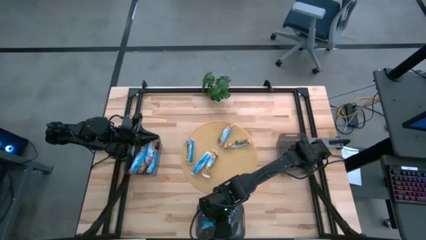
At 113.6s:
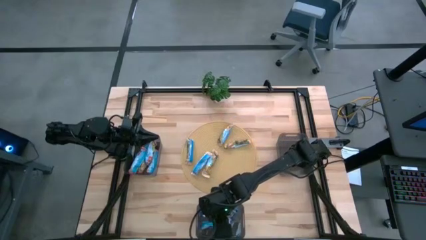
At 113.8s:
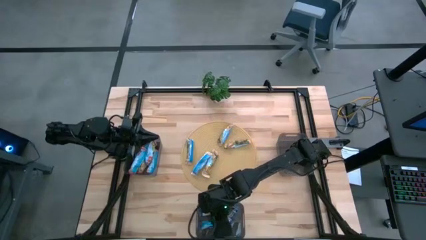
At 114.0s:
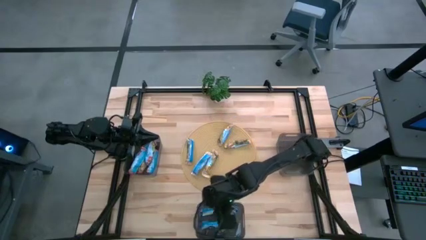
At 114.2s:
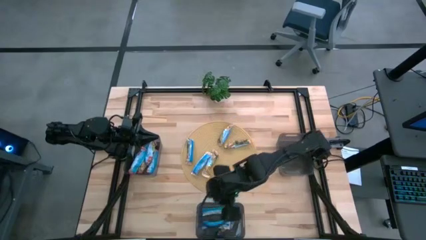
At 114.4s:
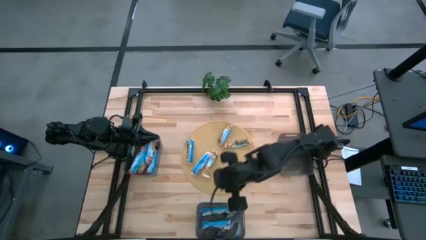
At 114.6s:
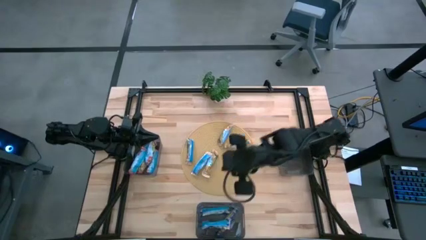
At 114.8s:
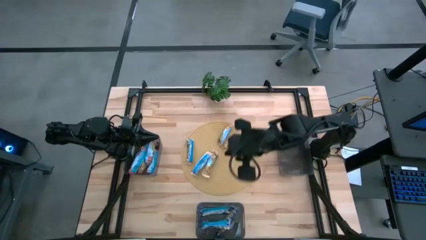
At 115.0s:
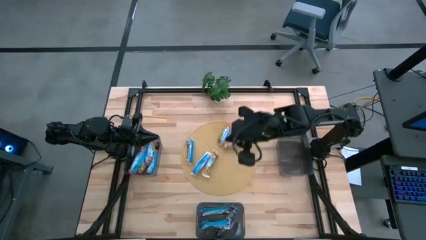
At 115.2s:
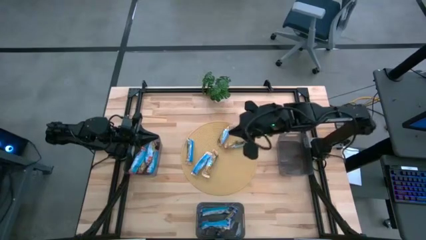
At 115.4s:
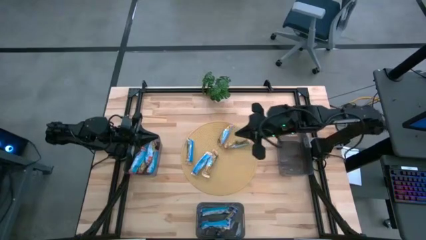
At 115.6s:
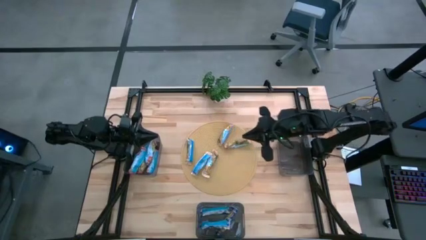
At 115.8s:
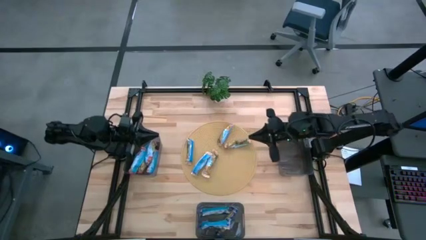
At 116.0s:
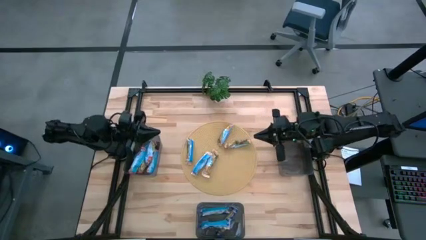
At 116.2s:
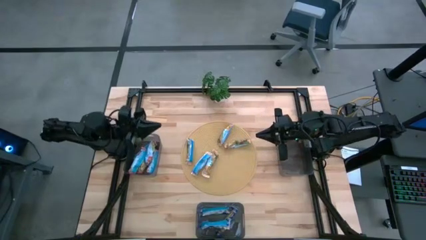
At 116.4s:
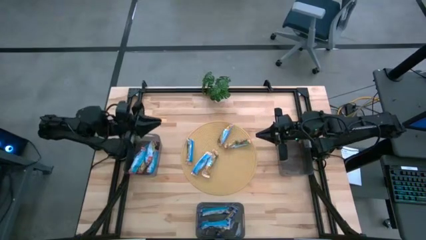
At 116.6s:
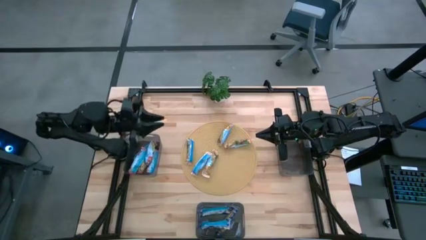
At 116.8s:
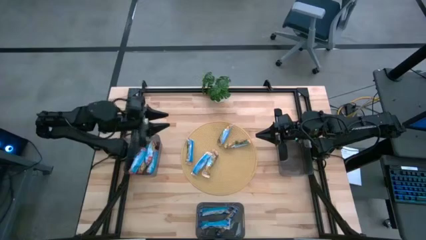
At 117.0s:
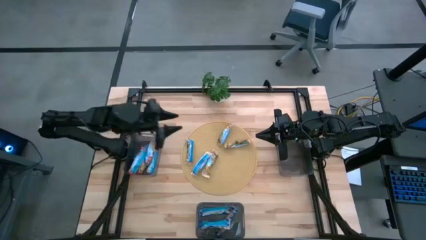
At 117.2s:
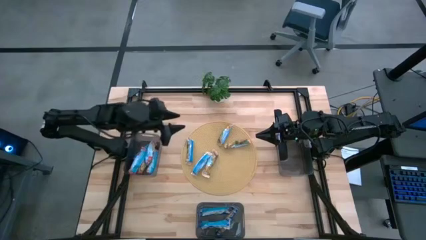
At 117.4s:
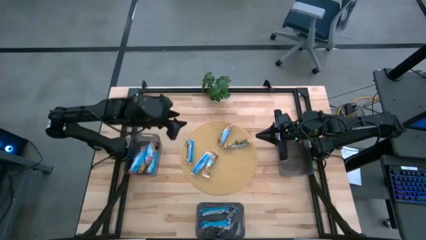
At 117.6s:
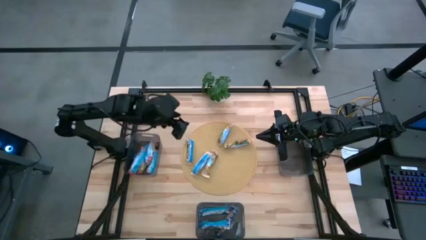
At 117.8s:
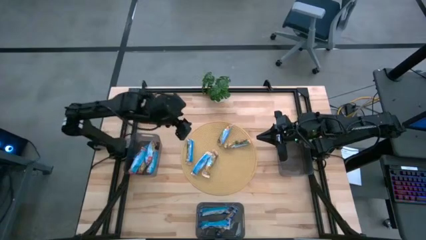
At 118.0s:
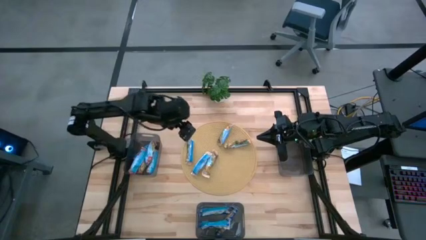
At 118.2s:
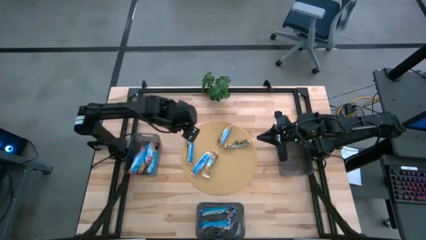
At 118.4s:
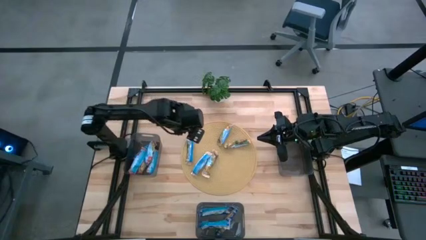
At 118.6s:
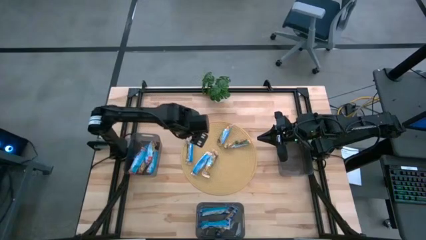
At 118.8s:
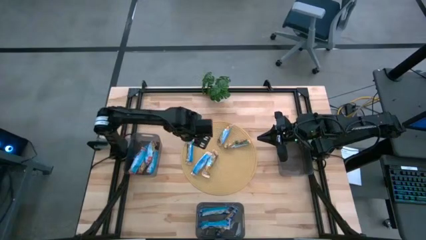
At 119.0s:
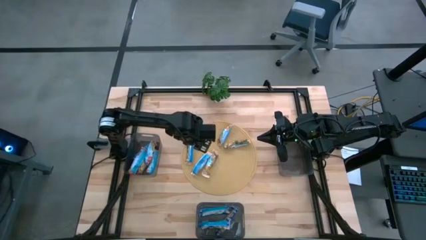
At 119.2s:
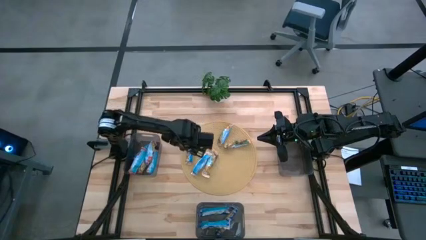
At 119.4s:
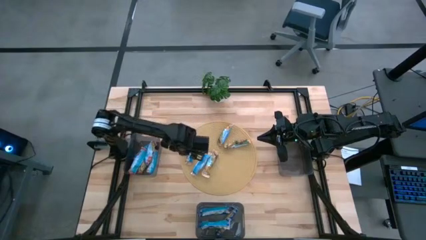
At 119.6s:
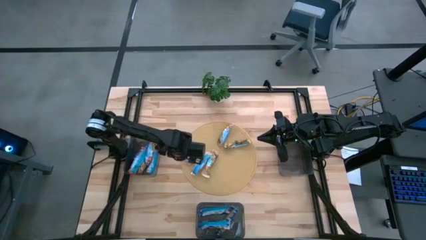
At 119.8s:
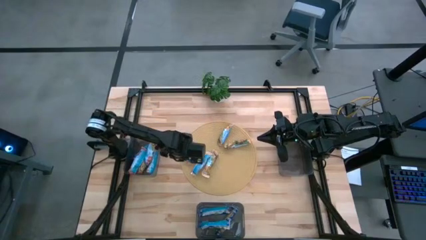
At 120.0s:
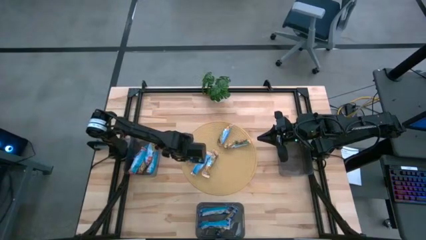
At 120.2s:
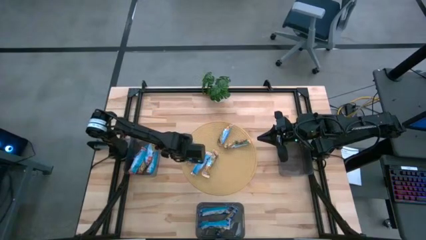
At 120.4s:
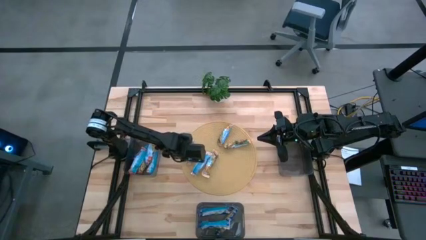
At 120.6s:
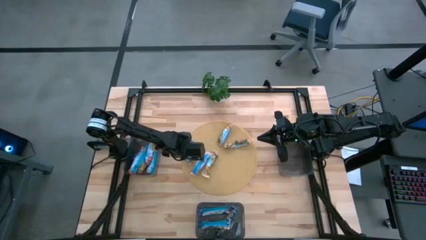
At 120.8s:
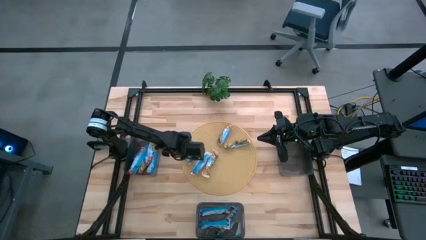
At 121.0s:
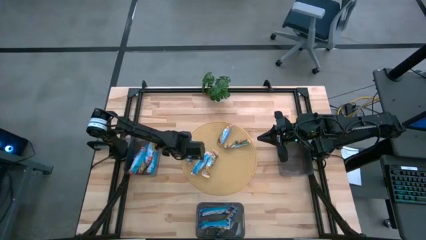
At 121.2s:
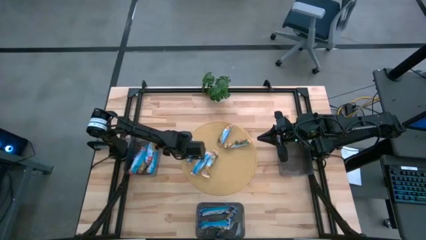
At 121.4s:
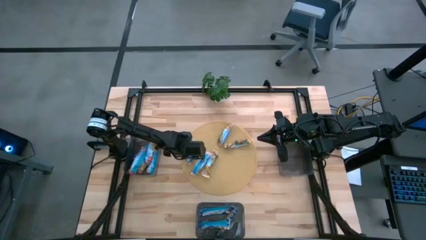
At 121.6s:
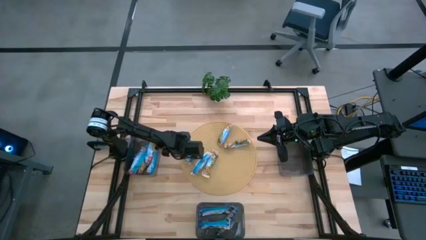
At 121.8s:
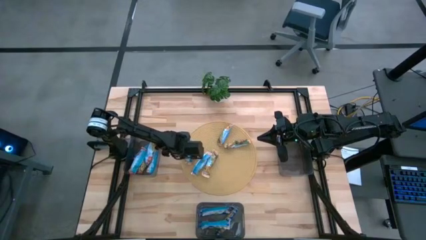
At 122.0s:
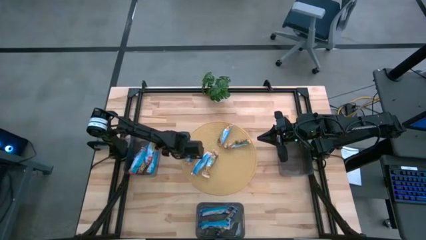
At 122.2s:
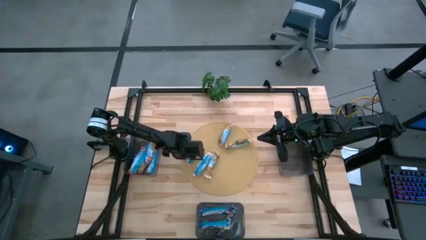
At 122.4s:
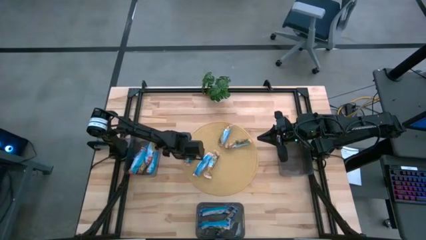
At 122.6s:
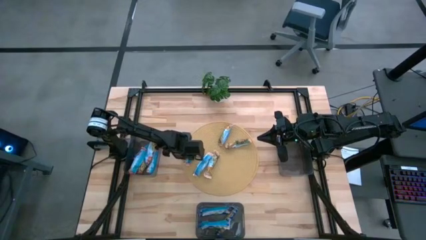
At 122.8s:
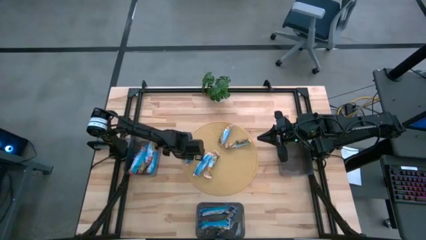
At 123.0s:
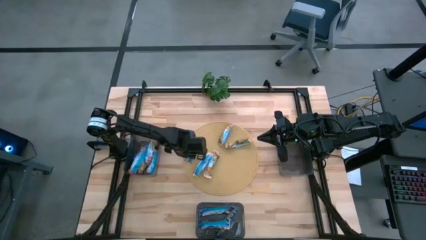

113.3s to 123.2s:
Task: Pick and place Granola Bars by type
Put the yellow granola bar into the top right bin

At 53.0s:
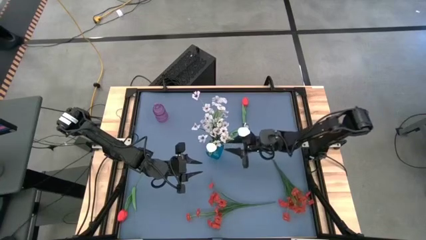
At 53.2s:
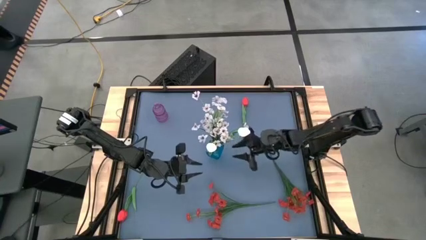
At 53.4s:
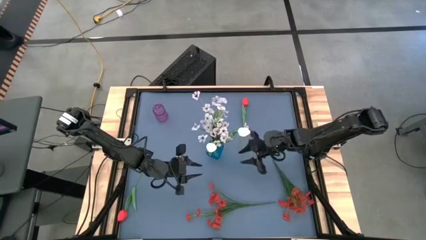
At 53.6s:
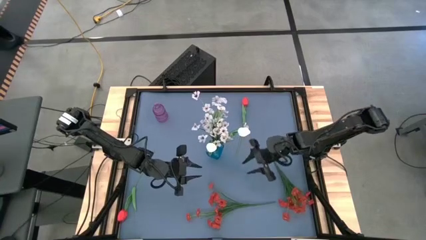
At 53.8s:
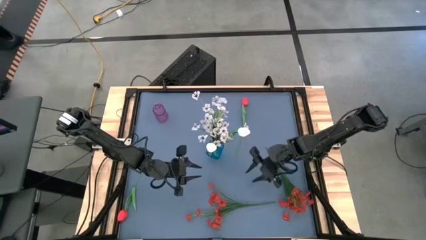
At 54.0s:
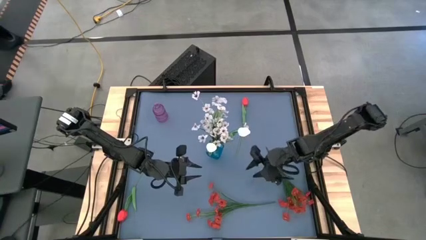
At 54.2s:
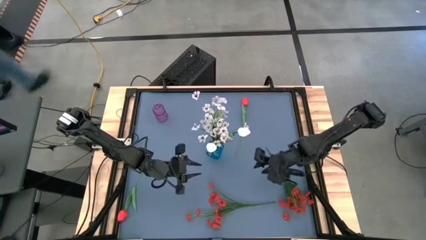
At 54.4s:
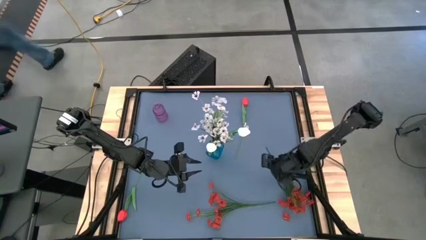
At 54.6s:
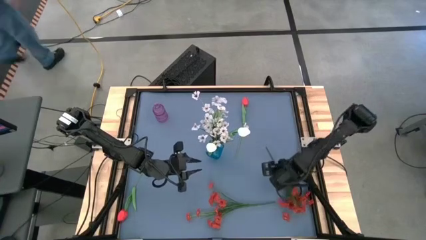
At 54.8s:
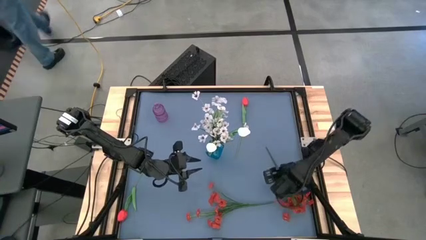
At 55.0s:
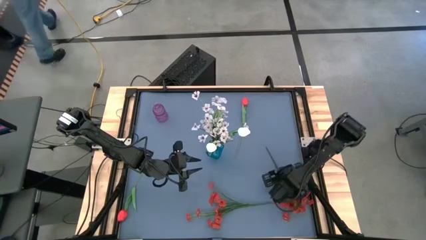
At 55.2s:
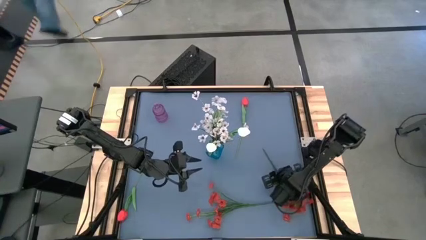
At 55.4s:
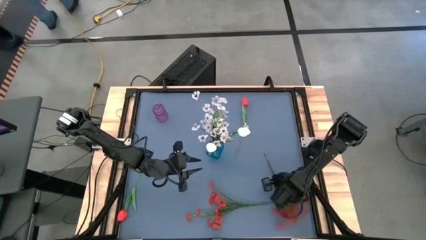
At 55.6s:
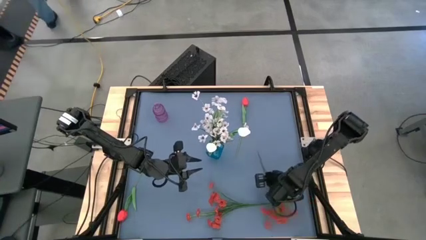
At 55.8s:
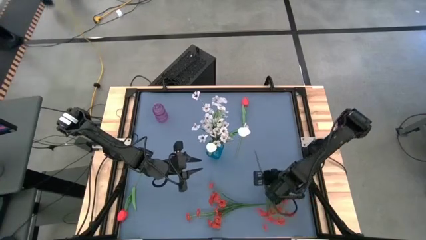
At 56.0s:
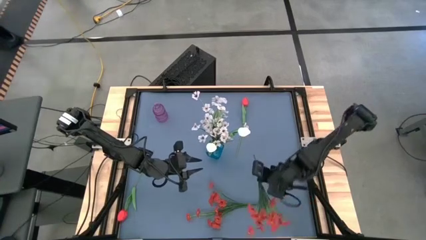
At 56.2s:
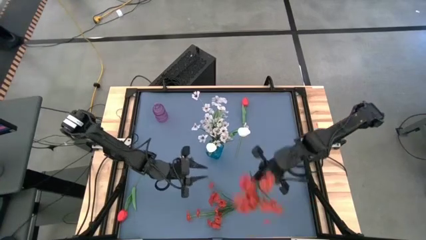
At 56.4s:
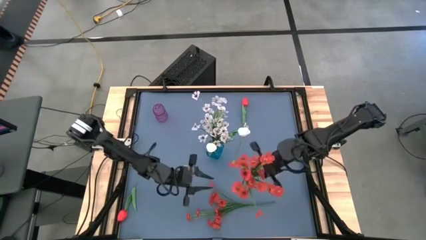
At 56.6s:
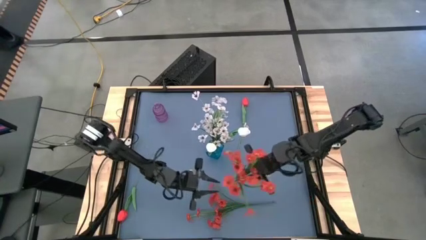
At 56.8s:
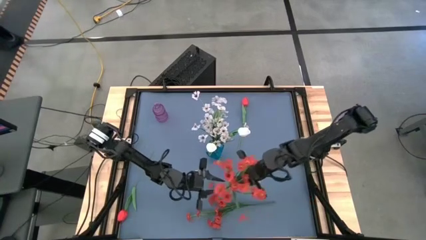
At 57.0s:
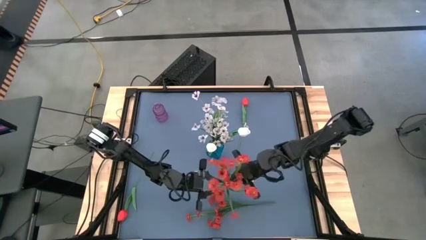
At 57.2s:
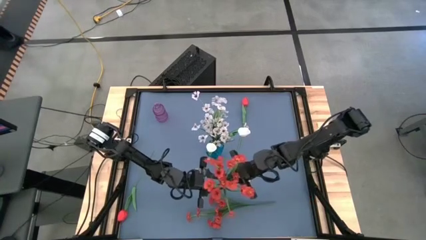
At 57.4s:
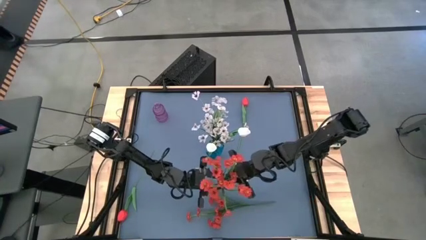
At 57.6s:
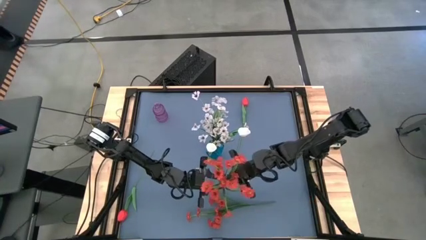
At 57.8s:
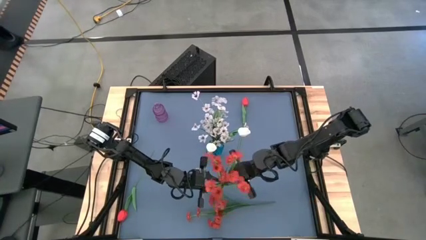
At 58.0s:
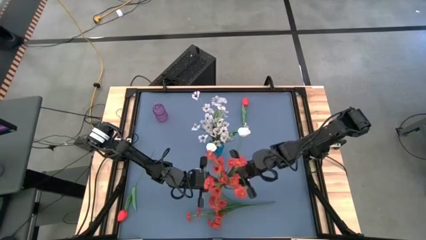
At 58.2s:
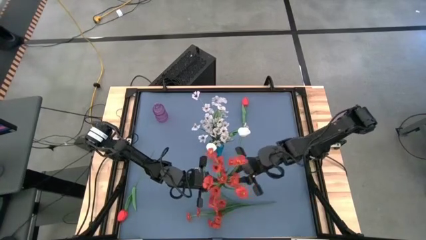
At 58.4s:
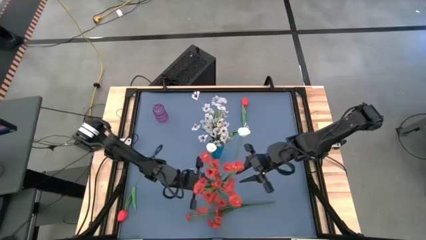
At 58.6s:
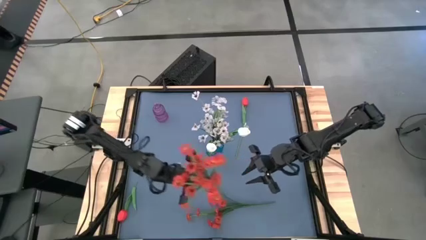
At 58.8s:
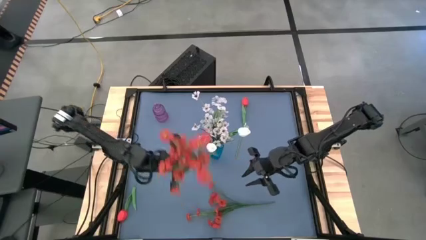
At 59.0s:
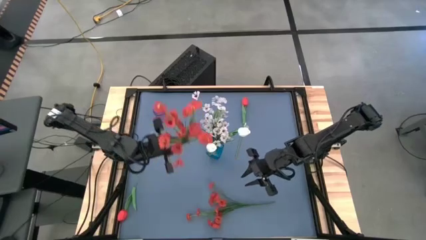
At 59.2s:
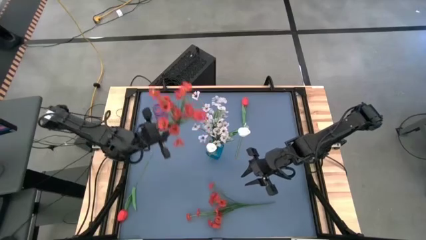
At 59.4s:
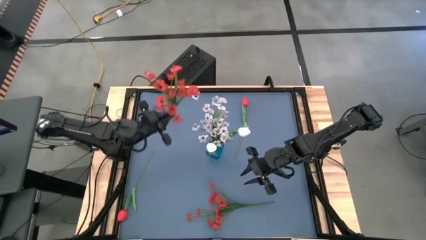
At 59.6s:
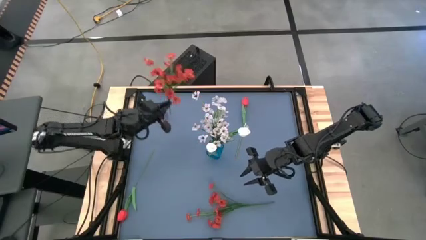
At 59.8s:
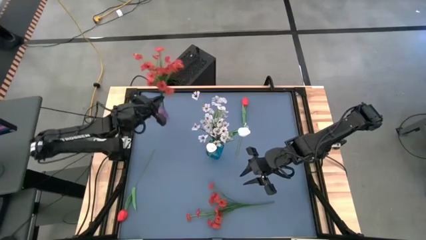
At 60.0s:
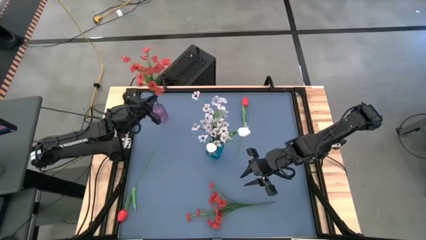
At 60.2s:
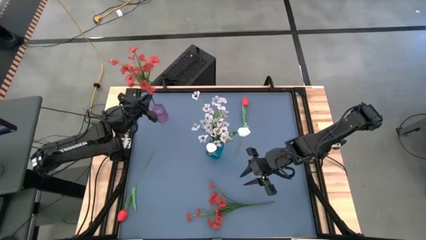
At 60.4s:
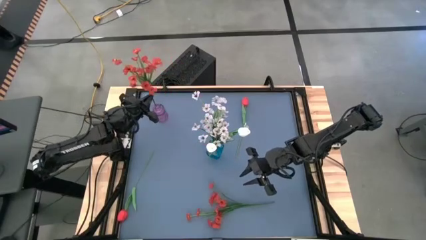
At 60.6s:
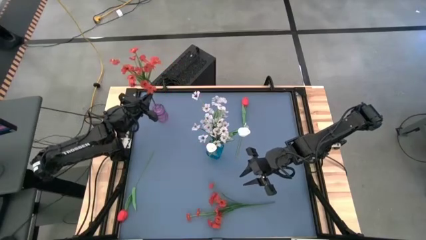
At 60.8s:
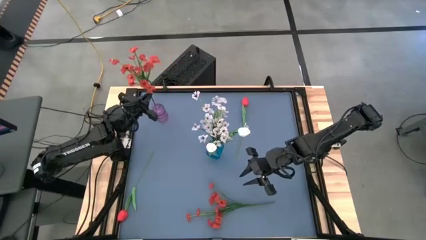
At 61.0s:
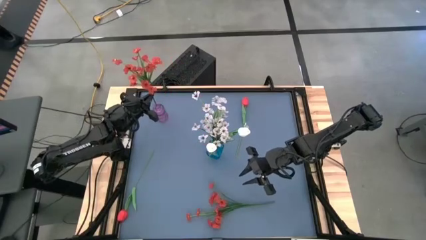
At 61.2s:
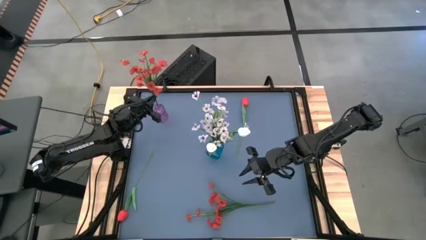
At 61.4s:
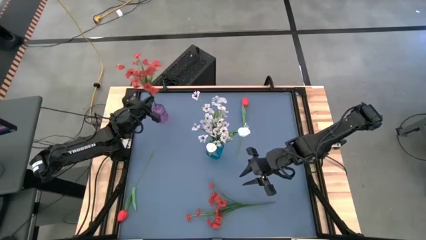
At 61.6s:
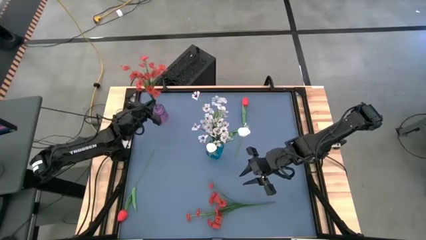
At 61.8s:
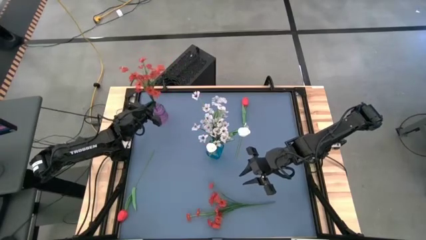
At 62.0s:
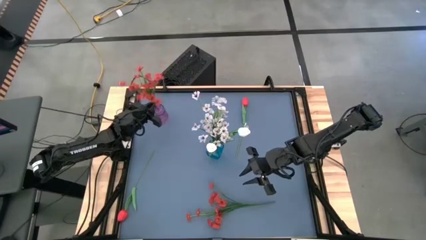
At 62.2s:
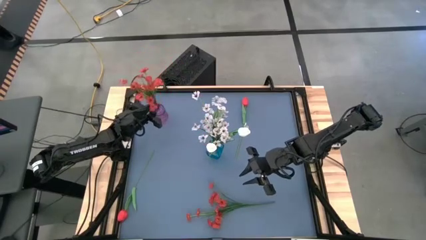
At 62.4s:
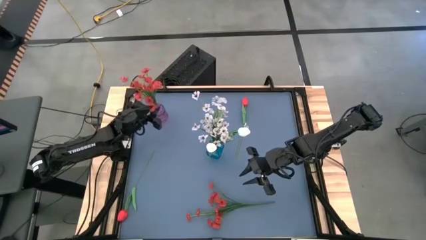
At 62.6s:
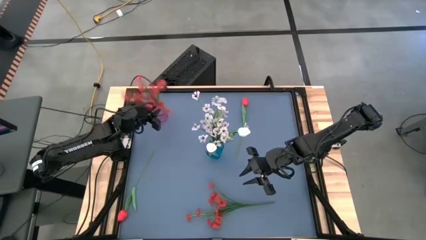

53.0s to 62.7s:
Task: Sort flowers into vase by color
Put the right red flowers into the purple vase
